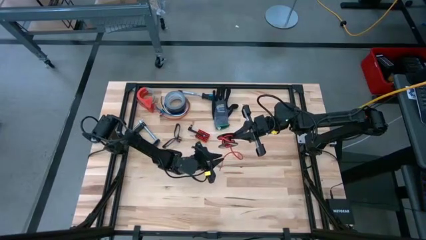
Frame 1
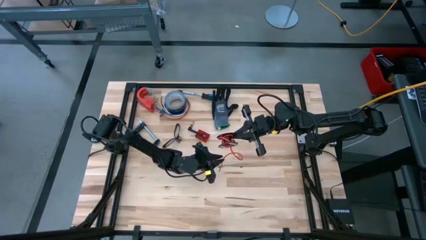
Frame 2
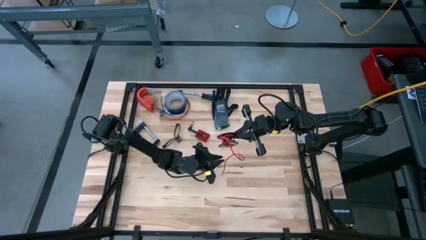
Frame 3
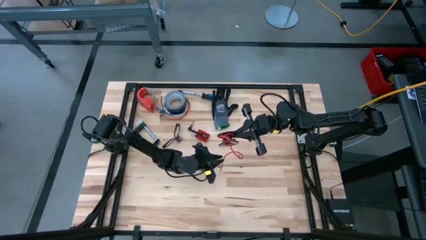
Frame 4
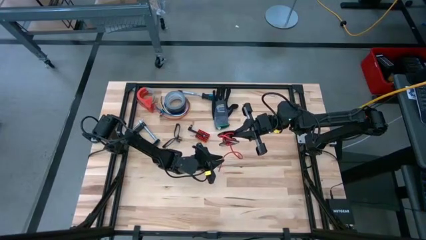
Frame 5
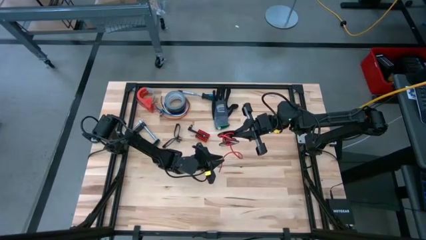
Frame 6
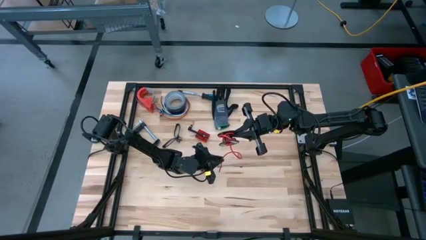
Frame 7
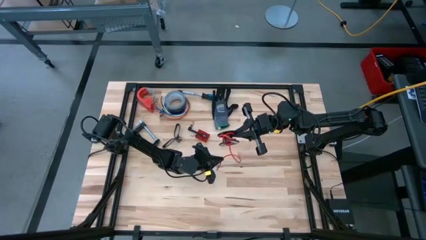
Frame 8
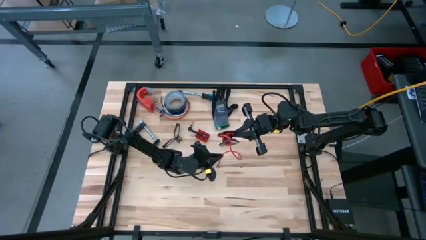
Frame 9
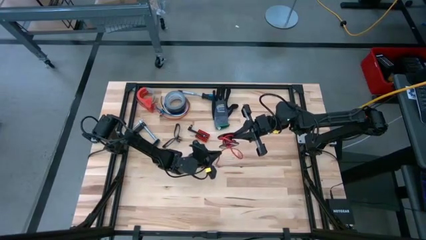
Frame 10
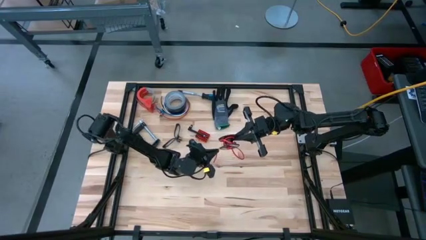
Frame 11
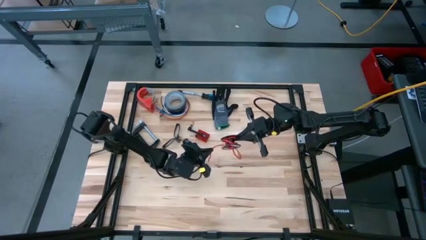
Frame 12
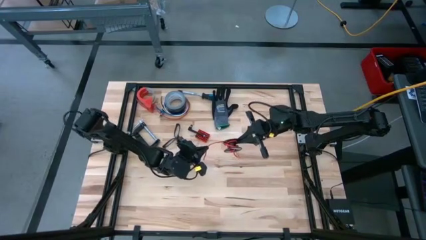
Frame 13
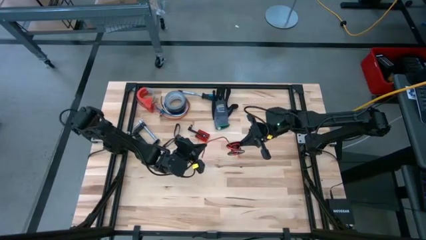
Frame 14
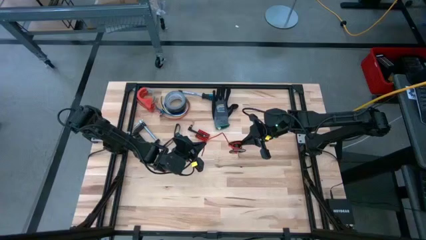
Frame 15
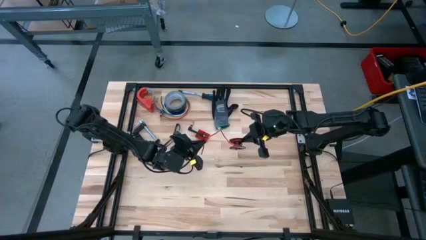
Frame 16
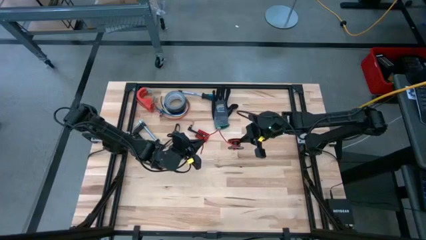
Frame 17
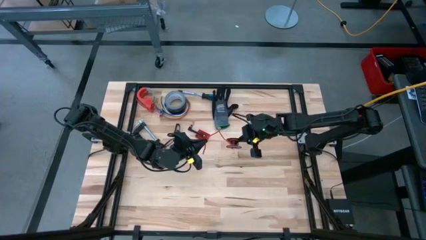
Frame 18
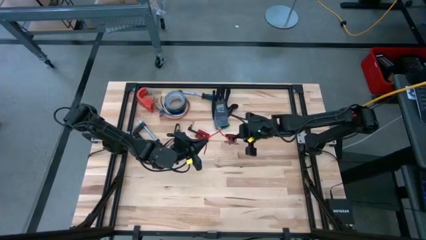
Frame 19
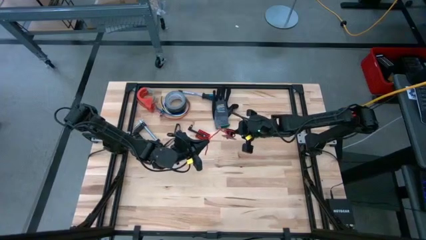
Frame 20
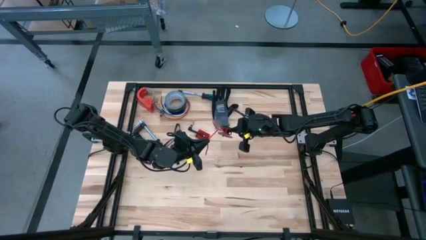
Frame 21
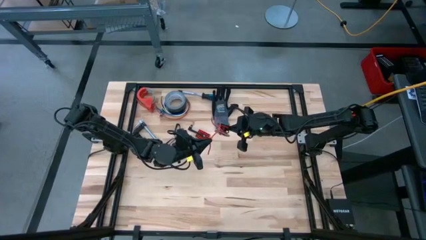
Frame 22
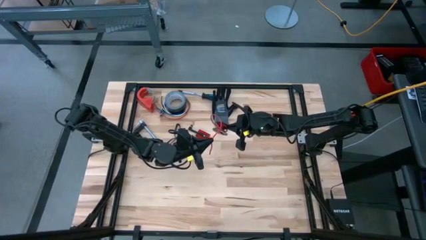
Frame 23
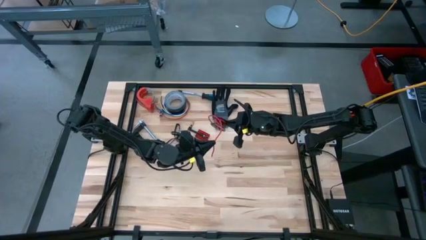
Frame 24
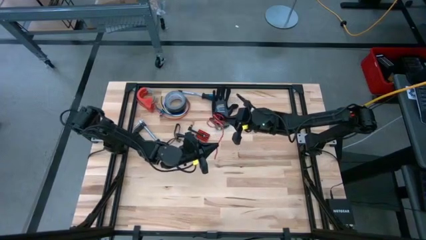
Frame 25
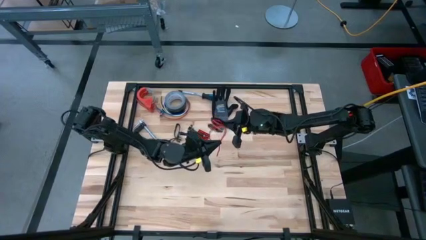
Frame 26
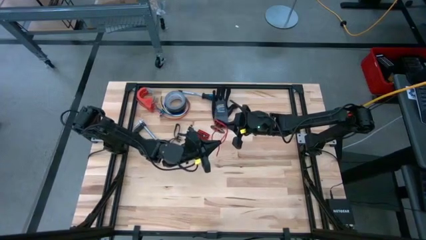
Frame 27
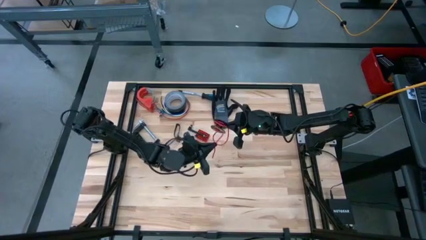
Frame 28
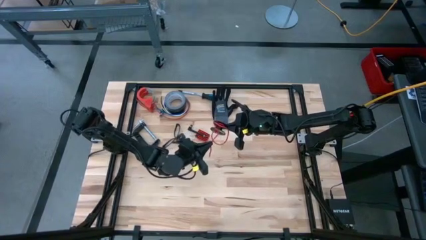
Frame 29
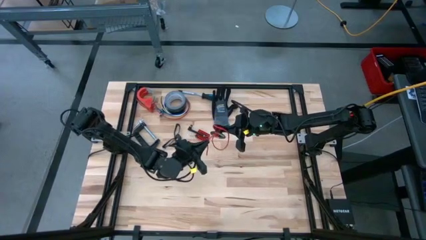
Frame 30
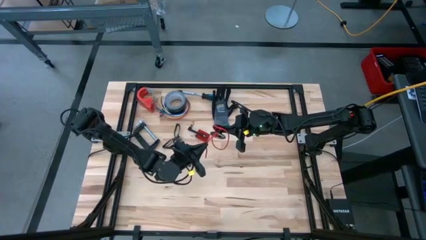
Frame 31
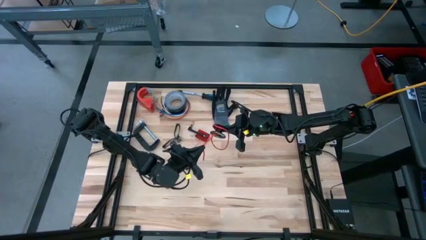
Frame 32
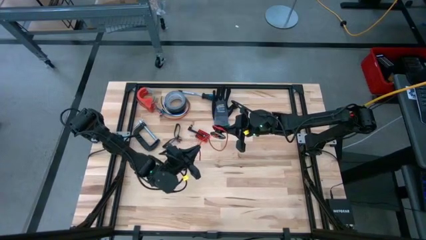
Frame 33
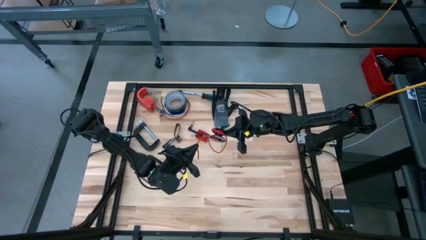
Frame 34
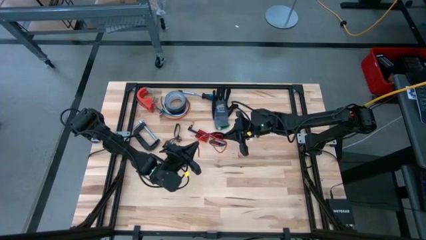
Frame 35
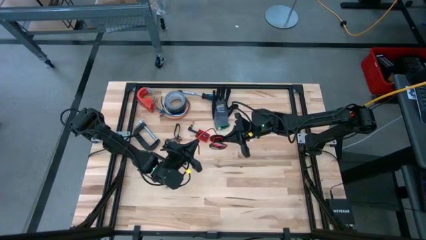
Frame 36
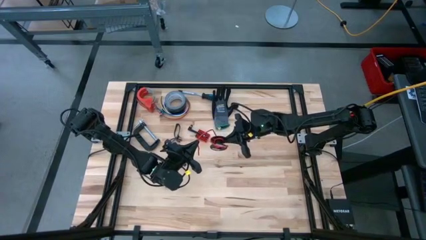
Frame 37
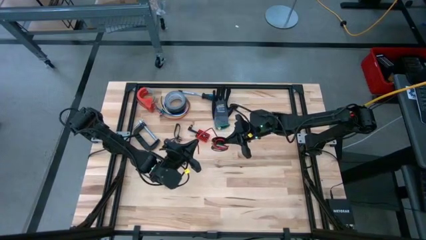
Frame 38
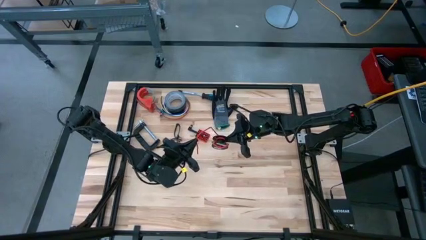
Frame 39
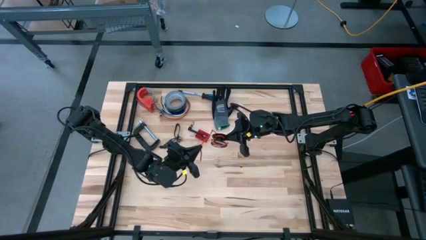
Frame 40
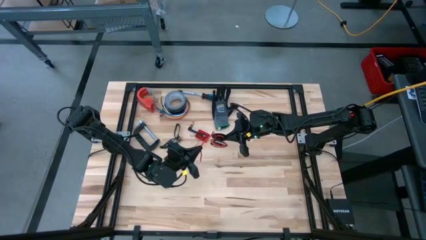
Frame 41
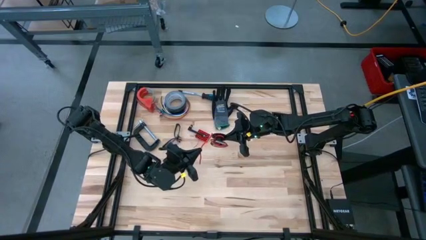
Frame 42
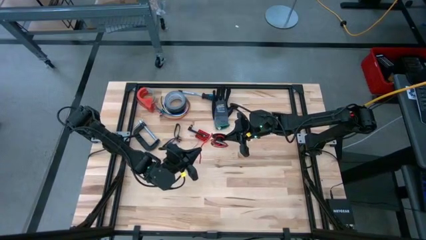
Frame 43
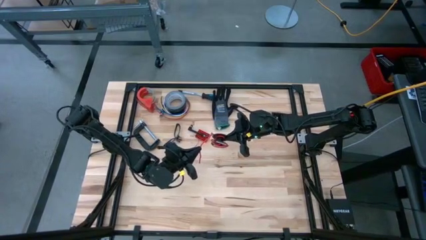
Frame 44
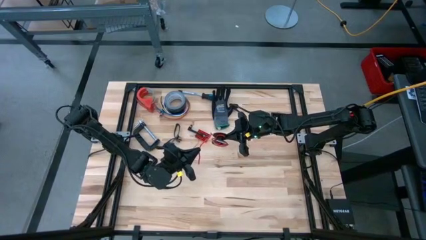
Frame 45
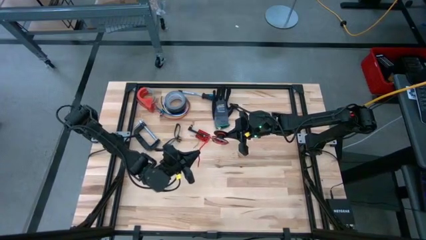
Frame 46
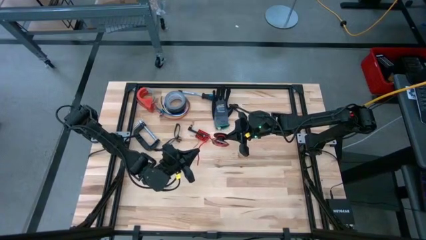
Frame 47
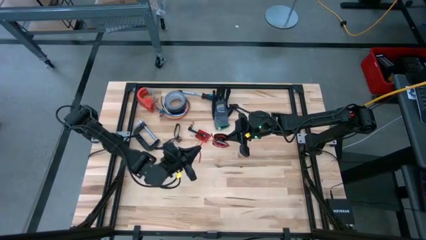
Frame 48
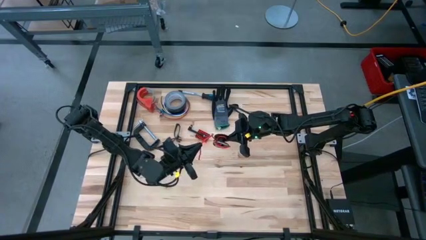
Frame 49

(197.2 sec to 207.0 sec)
Task: Coil cords
Coil the orange wire into the black spool

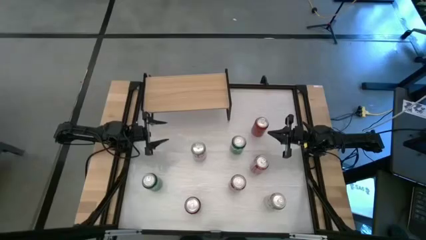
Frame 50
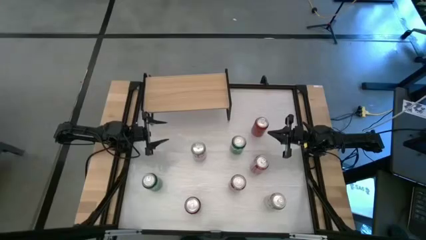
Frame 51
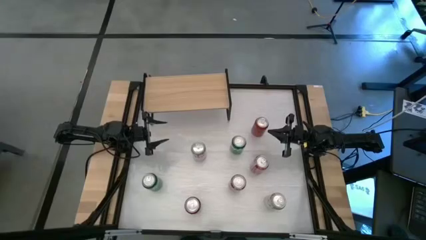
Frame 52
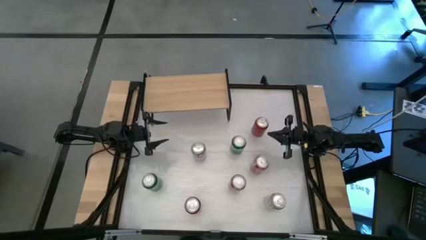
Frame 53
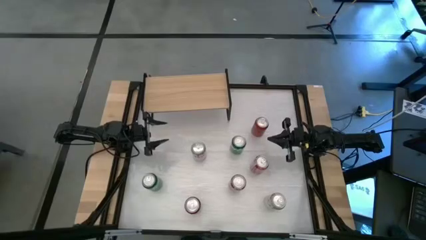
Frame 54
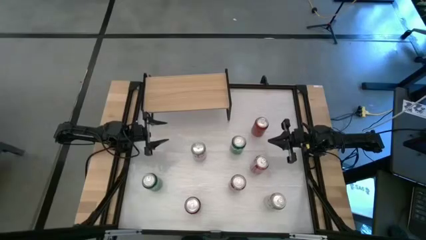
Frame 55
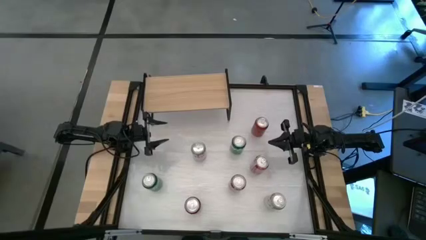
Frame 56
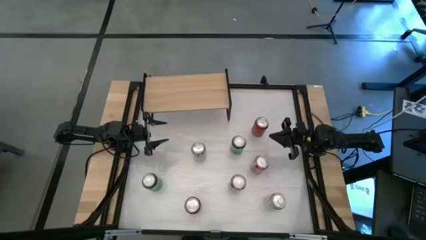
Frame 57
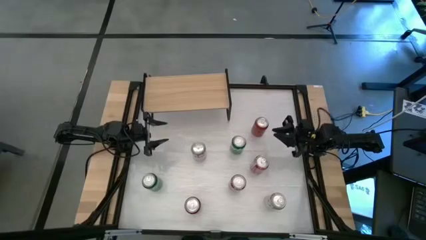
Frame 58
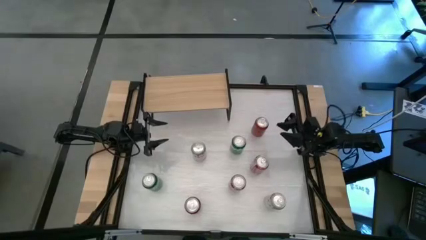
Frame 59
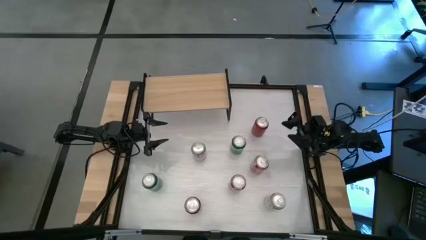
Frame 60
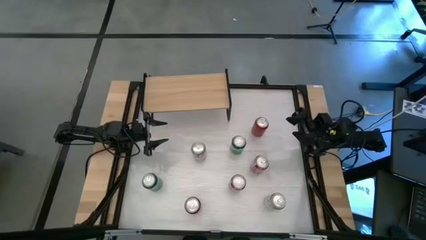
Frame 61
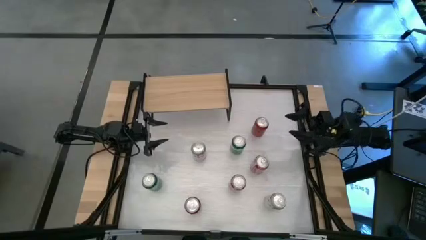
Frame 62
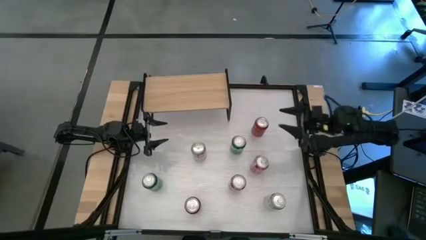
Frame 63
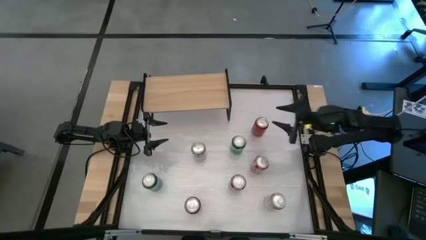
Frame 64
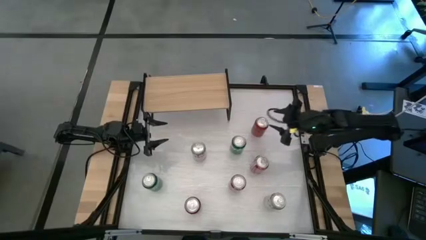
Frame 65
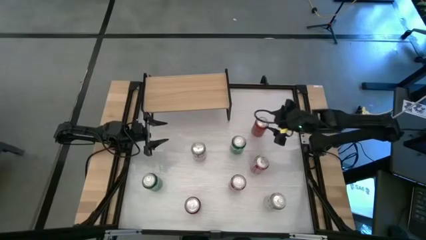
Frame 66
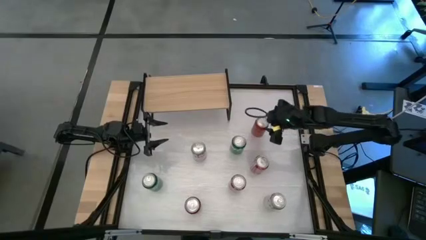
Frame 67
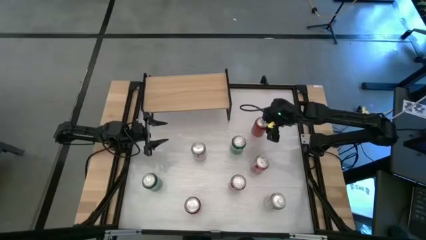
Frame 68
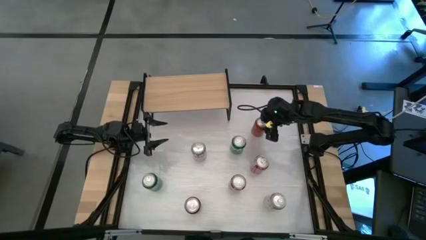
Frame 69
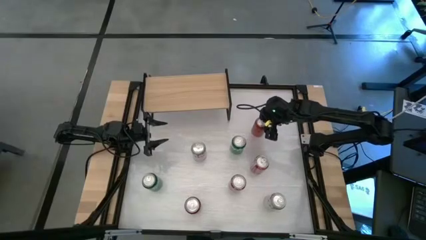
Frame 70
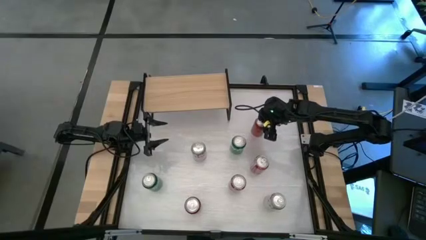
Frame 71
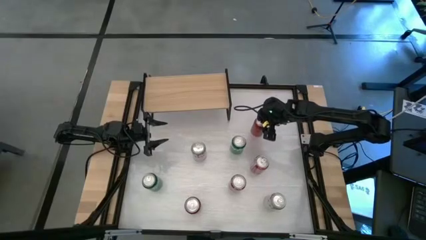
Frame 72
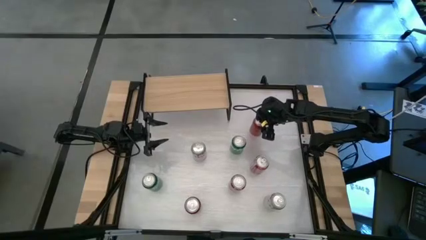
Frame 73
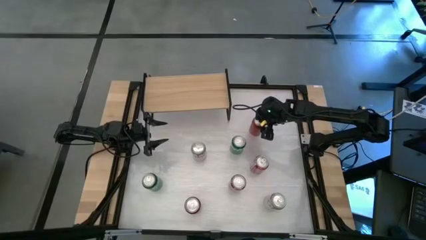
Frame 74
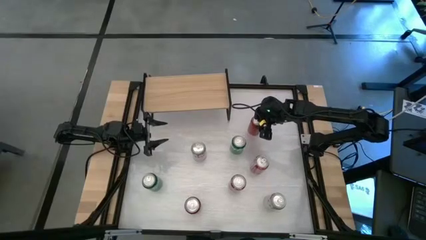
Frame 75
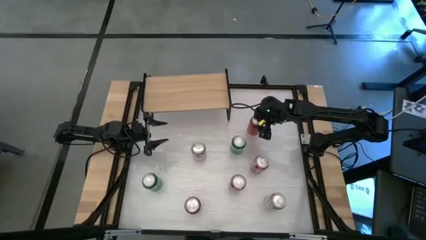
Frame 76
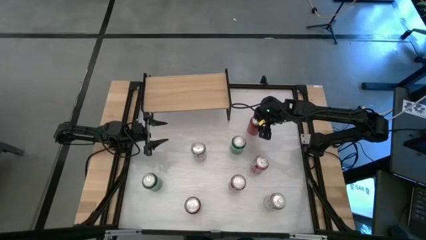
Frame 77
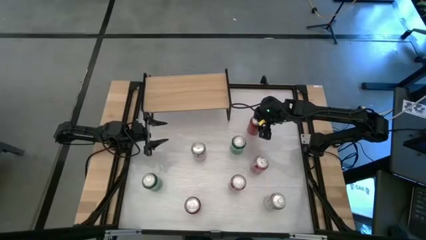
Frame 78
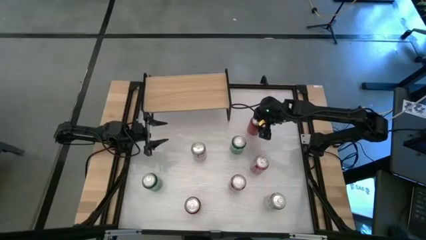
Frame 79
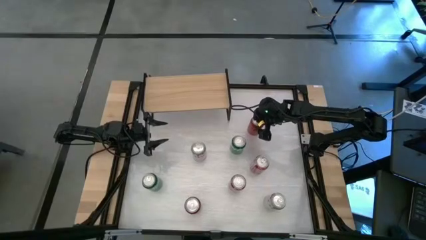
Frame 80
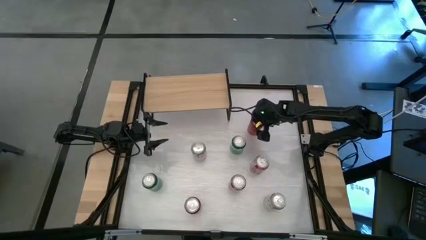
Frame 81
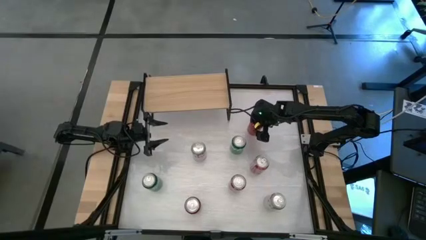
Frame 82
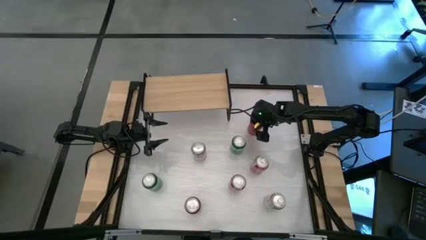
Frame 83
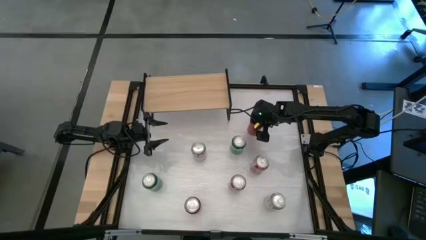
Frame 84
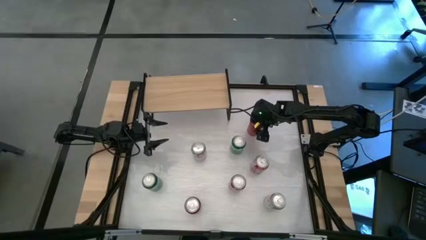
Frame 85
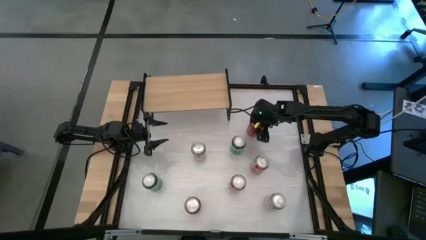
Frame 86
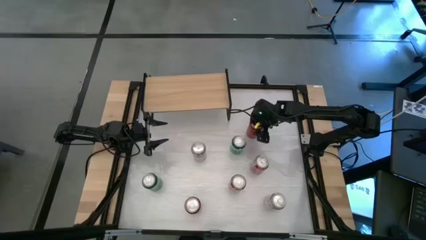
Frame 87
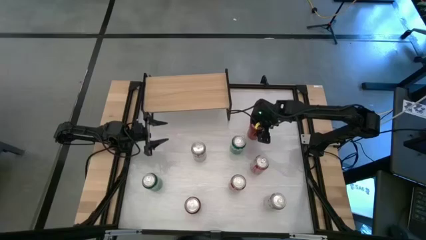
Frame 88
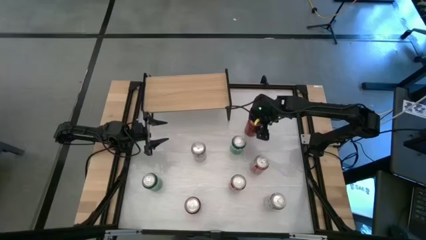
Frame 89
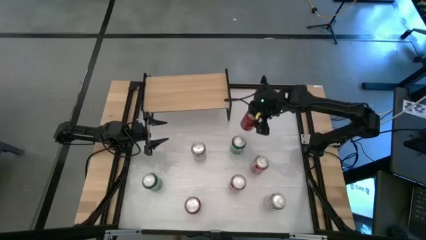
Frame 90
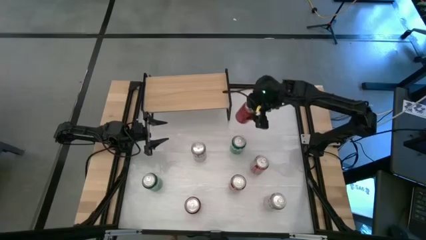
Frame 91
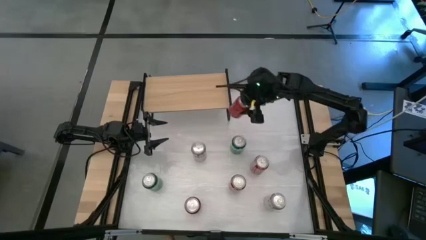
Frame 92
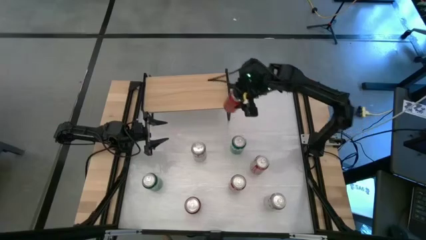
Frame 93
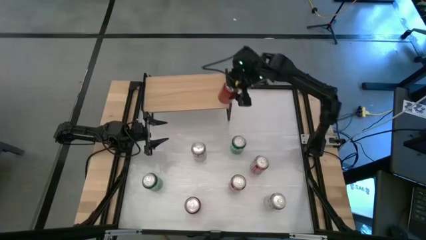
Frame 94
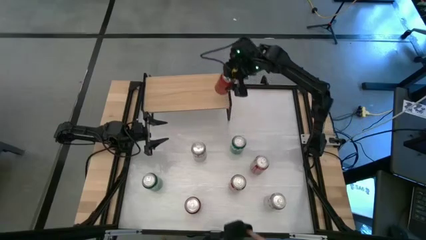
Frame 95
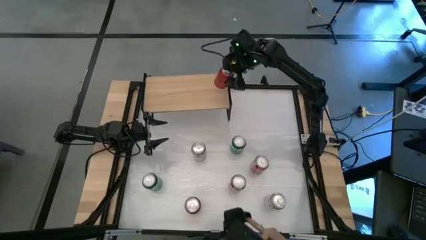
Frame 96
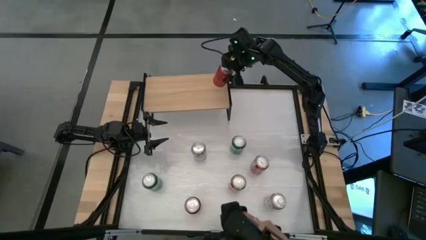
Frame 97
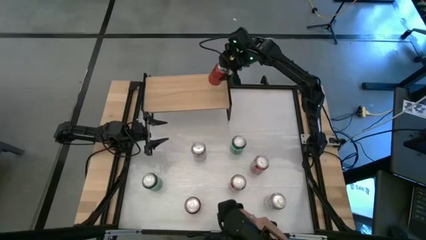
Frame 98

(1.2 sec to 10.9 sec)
Task: Place canned beverage on shelf
Put the top red black soda can on the shelf
